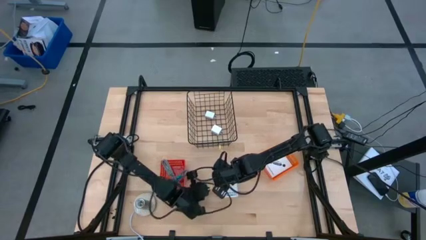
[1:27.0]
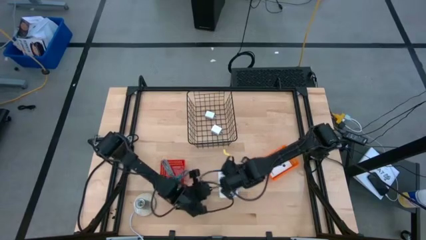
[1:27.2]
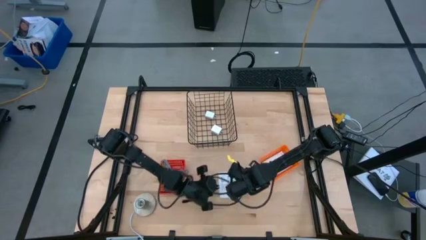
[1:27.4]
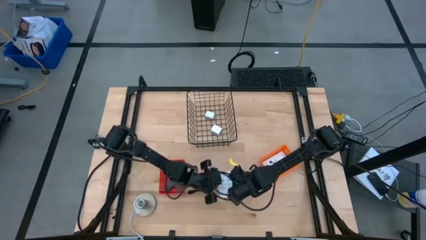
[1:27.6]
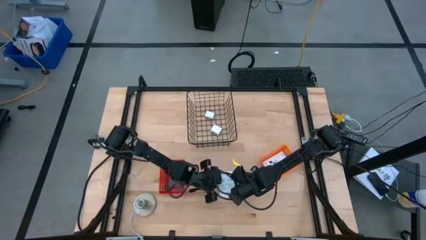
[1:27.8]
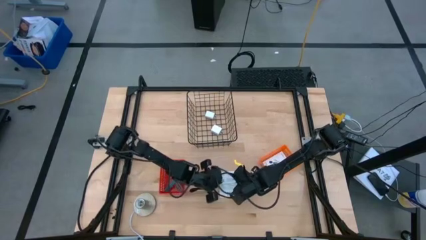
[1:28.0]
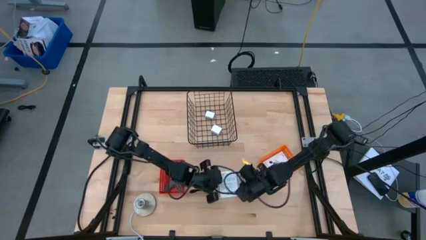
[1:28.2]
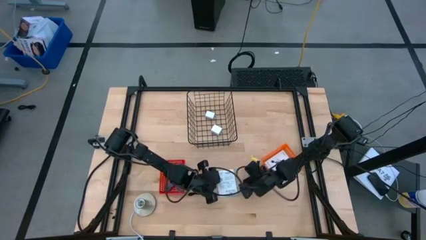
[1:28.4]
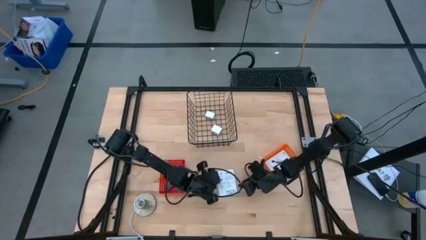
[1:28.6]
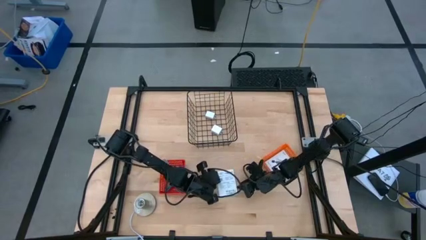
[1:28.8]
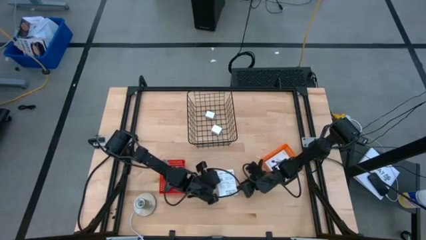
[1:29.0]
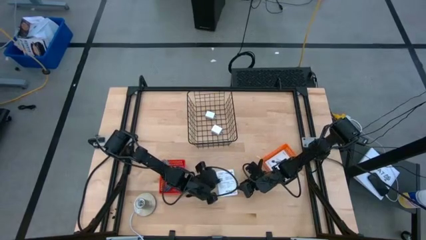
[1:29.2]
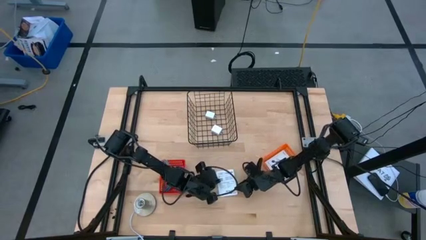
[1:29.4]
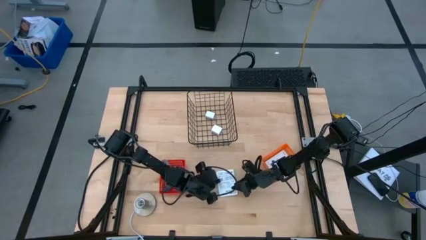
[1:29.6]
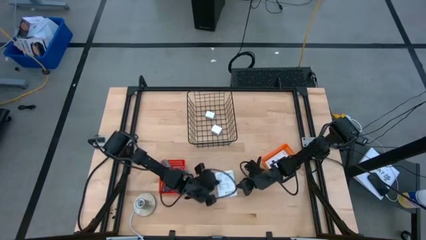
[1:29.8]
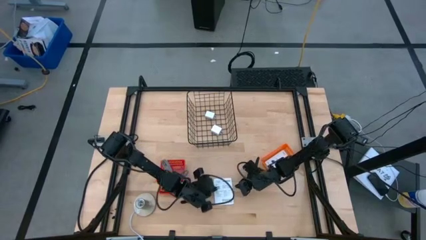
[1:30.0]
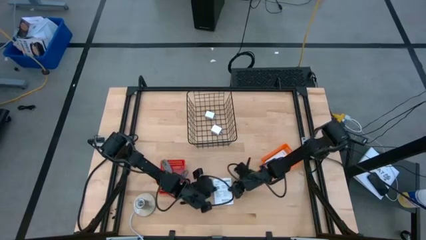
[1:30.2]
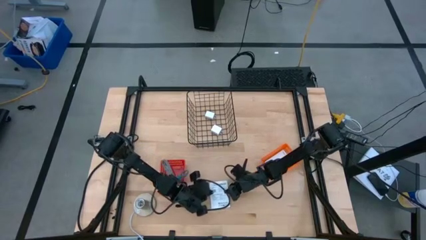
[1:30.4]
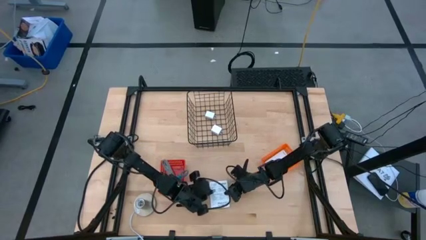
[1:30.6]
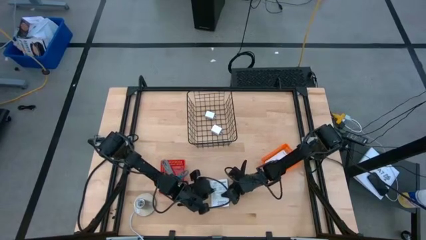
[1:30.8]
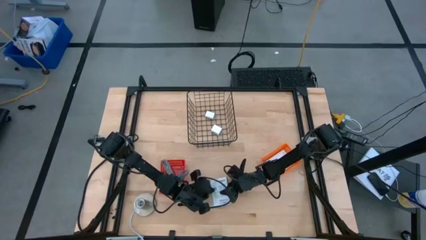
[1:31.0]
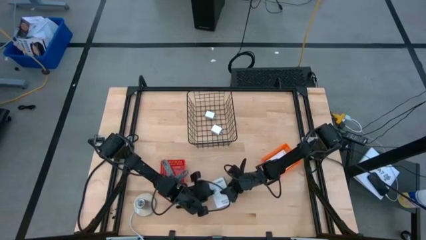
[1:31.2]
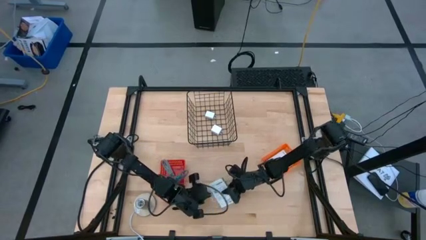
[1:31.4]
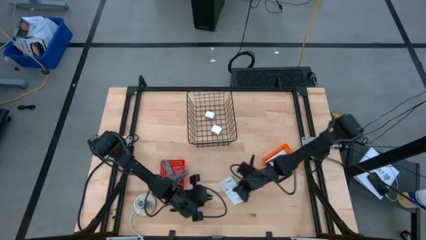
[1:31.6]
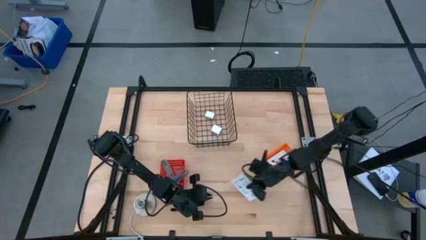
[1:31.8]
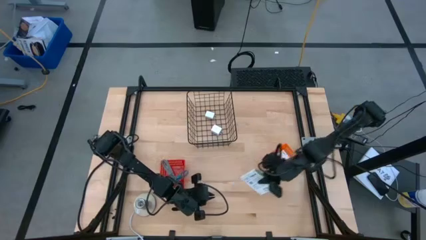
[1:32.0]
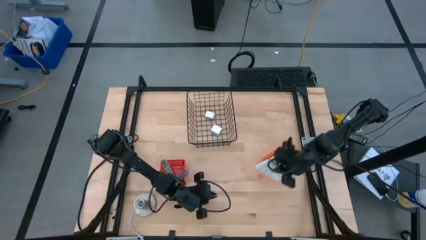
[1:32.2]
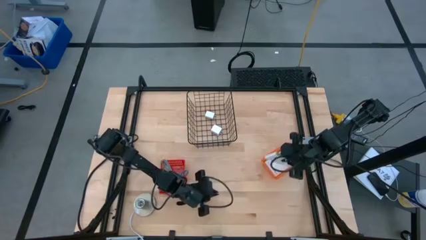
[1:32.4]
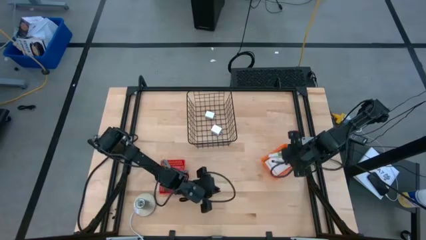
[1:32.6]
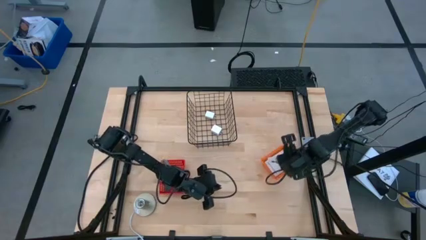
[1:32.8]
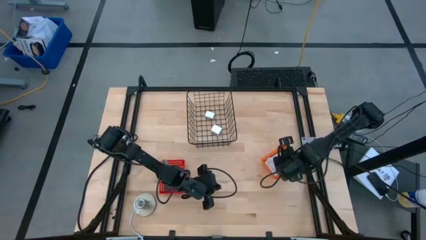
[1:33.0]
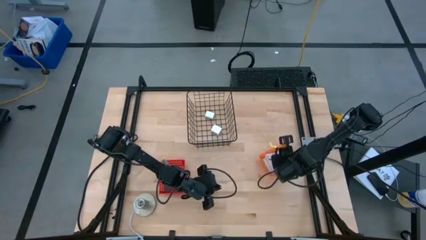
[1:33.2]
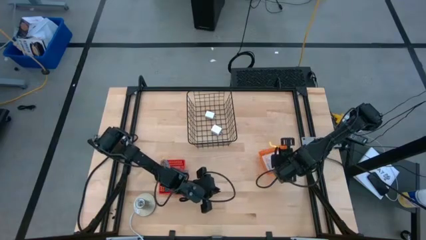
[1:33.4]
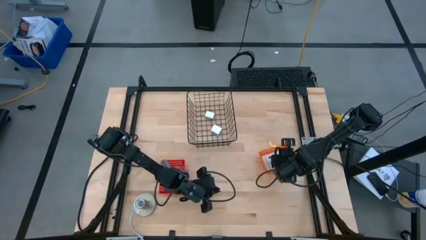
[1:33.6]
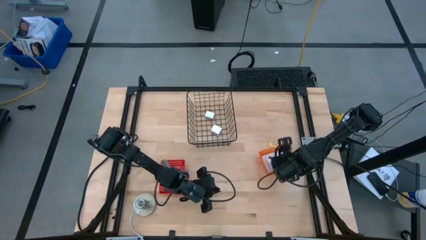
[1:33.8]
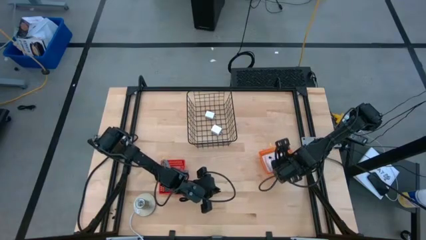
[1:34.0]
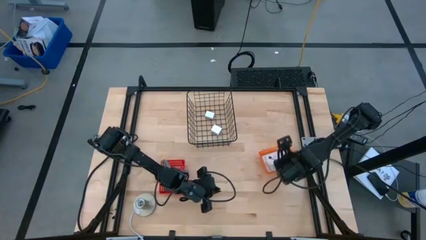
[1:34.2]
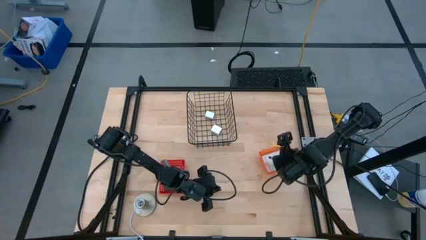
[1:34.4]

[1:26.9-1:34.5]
Task: Pick and place items into bin
Put the white card reader box into the orange bin

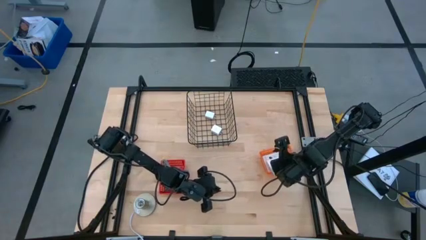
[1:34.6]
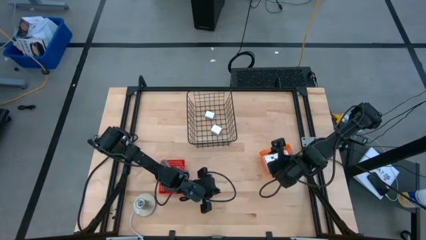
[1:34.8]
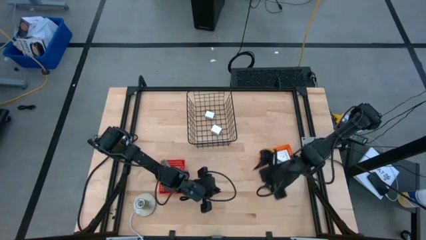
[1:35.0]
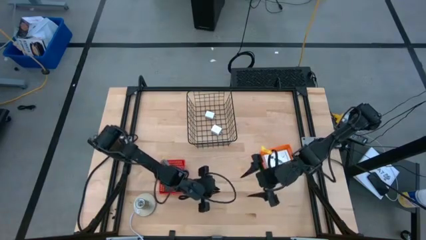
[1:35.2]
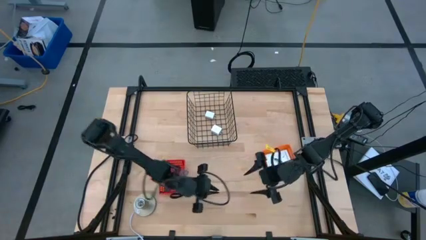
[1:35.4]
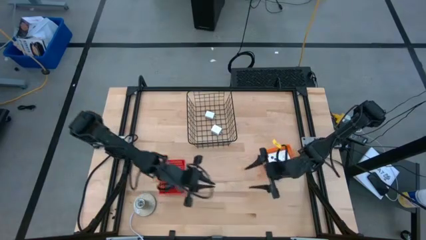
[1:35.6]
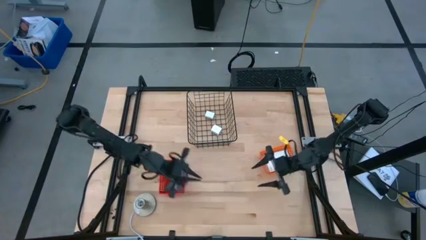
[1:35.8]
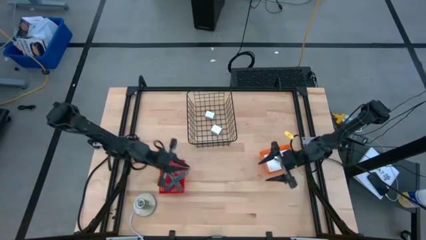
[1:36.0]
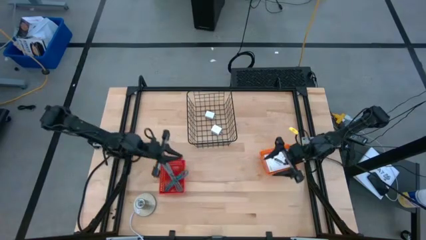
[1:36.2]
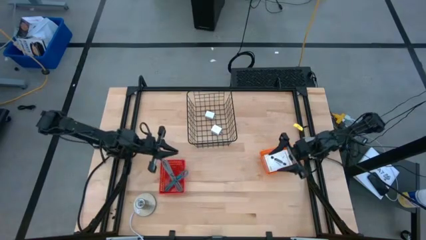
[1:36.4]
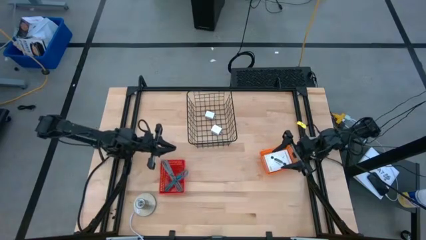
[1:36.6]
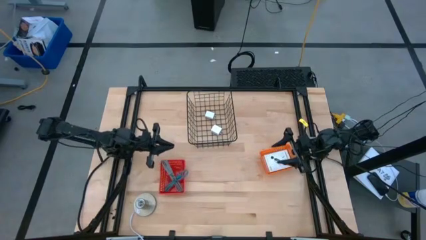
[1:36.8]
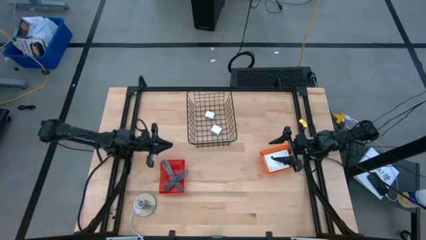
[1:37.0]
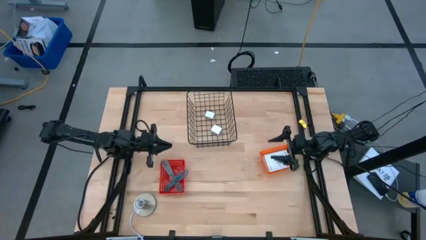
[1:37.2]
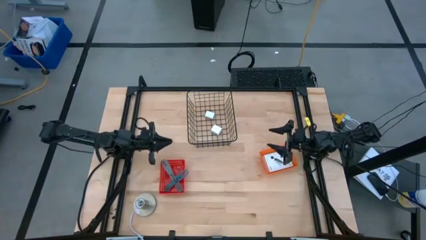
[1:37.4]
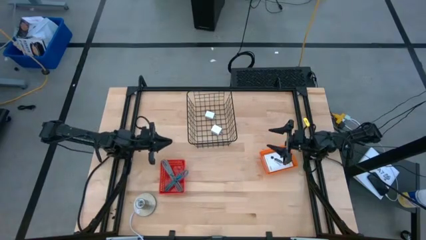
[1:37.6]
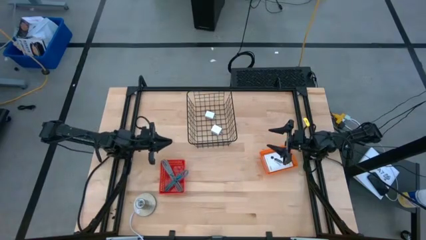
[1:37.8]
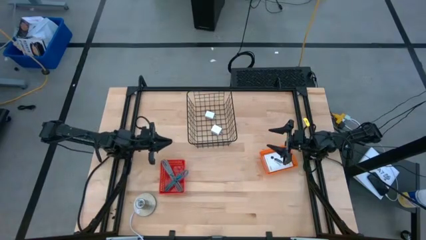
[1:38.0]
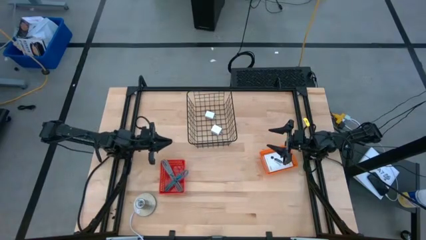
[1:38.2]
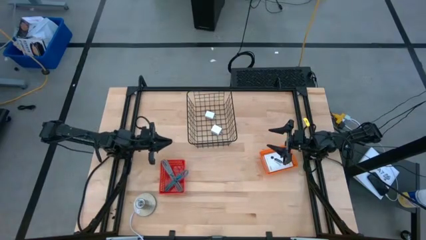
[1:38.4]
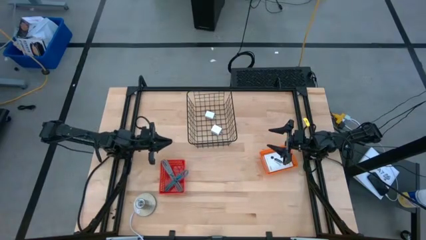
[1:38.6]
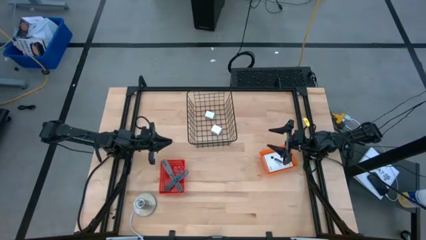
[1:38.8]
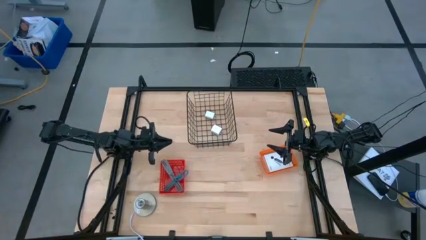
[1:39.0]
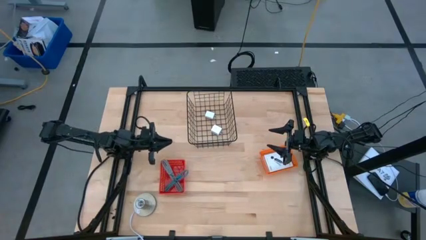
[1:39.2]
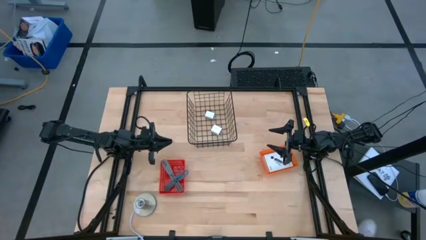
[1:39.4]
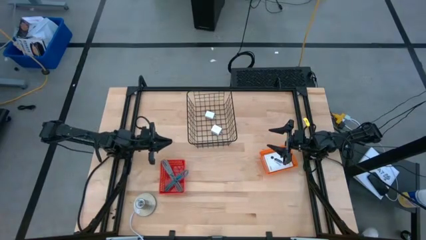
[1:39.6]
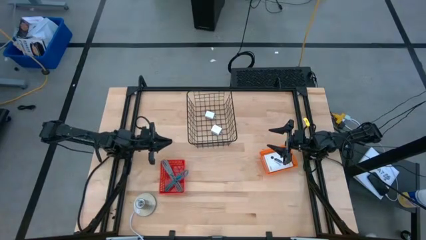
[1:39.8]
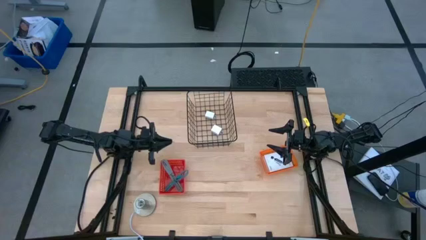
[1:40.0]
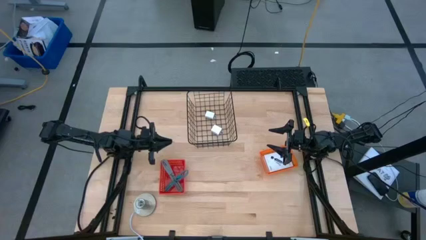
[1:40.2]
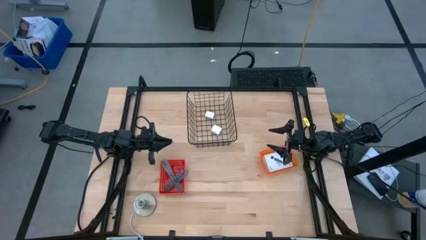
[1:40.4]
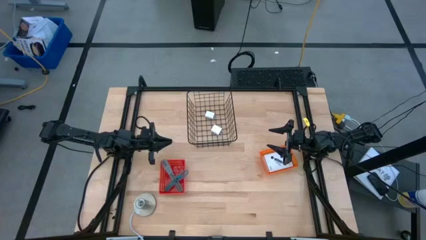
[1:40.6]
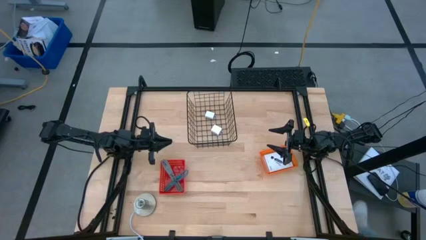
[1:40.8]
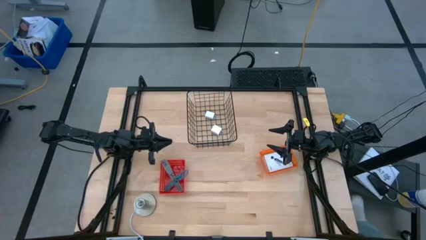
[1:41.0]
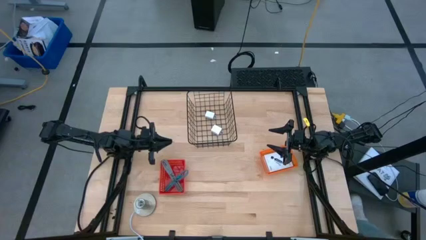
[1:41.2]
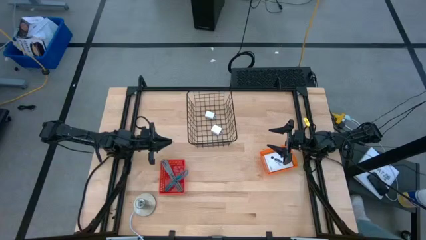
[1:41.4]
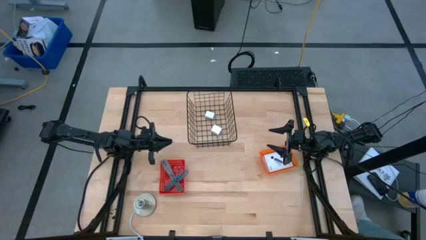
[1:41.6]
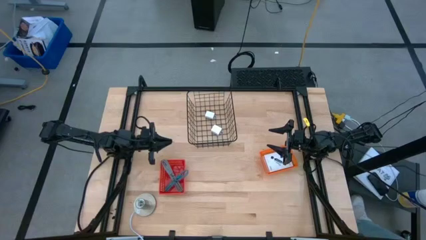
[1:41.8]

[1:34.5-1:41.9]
Return to Home Position
